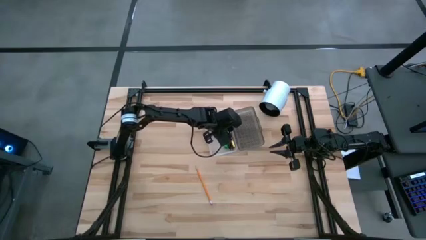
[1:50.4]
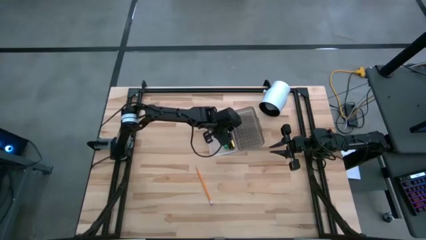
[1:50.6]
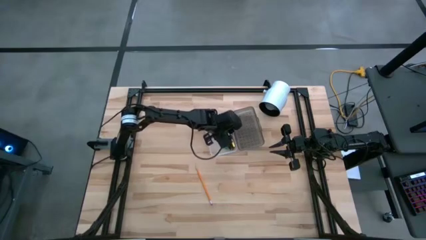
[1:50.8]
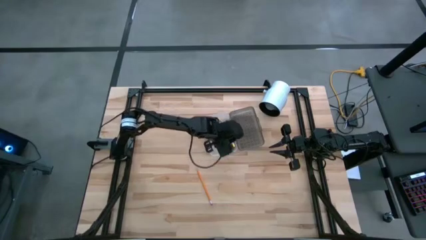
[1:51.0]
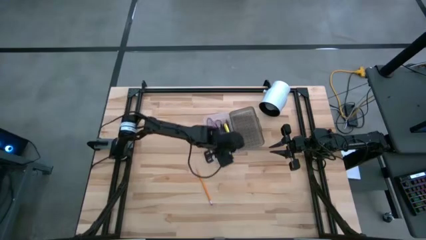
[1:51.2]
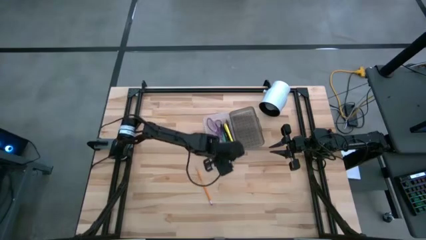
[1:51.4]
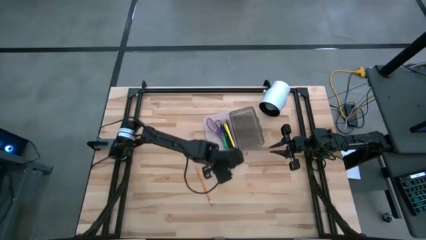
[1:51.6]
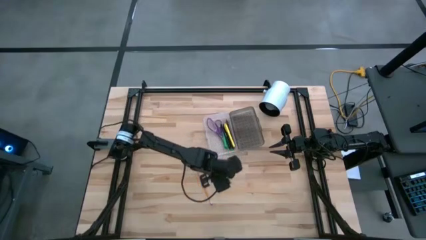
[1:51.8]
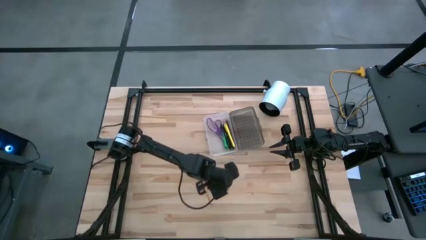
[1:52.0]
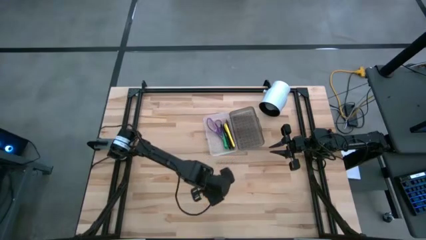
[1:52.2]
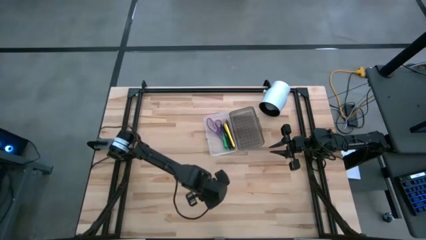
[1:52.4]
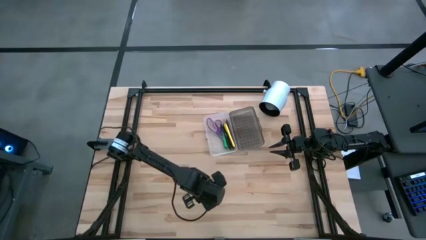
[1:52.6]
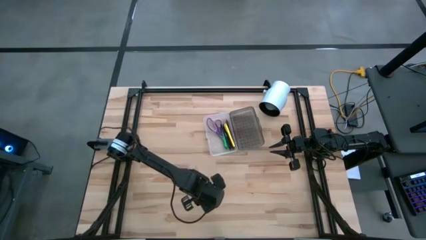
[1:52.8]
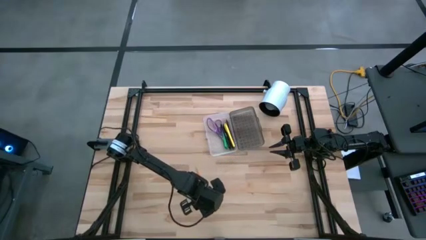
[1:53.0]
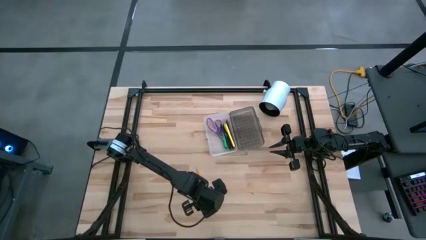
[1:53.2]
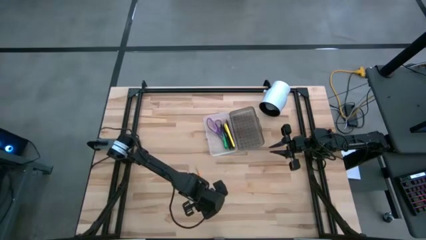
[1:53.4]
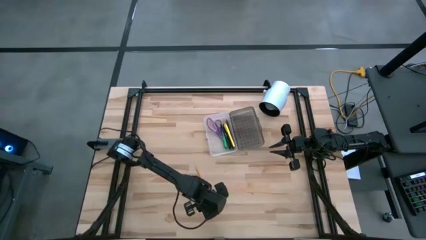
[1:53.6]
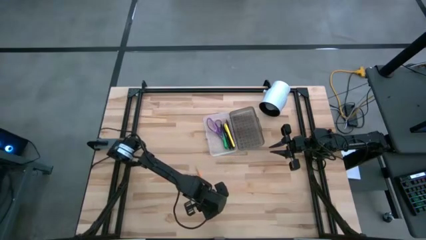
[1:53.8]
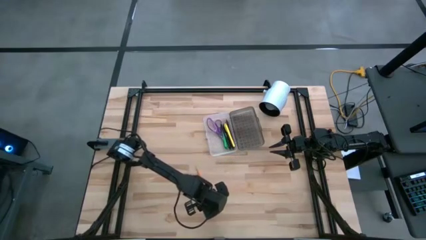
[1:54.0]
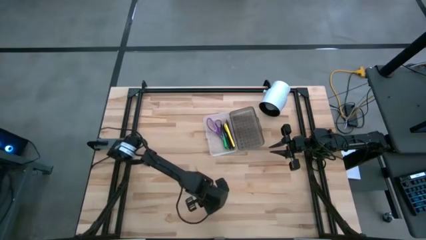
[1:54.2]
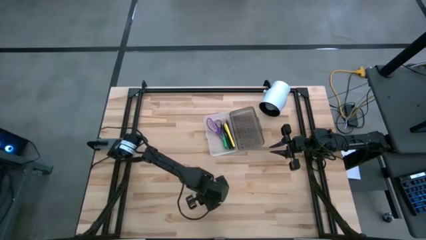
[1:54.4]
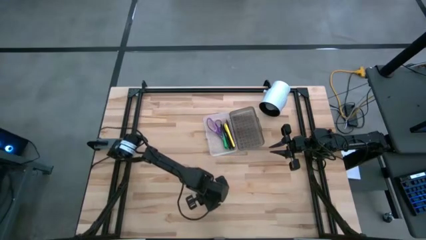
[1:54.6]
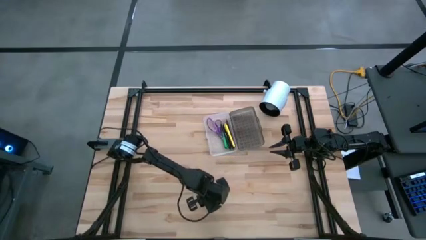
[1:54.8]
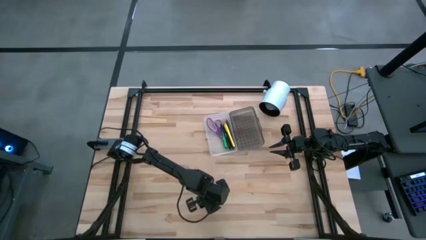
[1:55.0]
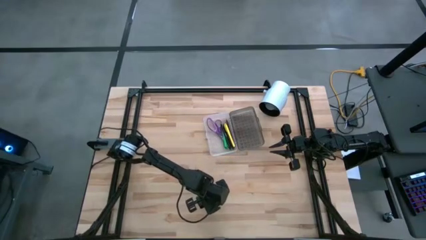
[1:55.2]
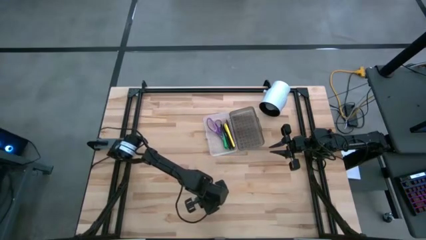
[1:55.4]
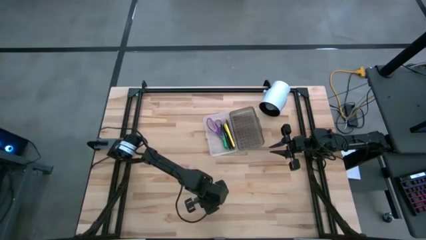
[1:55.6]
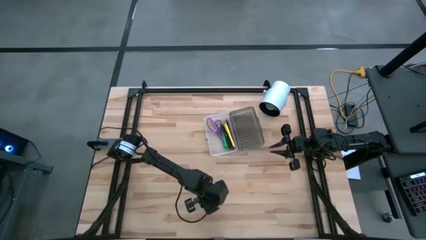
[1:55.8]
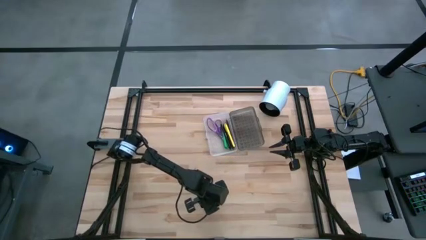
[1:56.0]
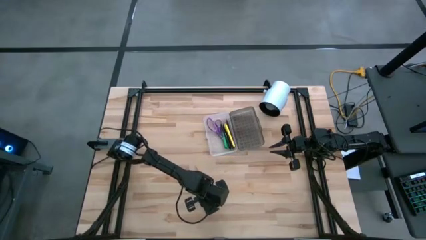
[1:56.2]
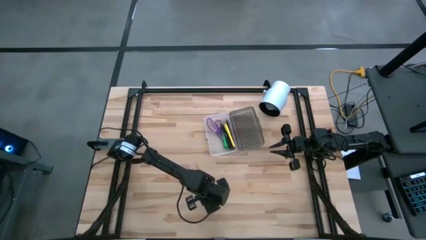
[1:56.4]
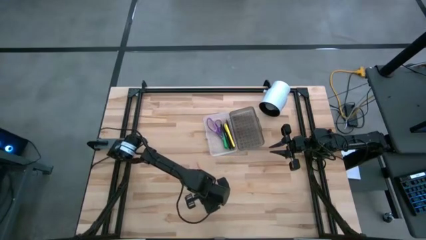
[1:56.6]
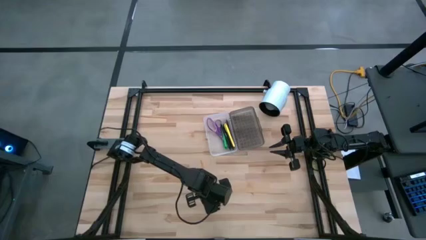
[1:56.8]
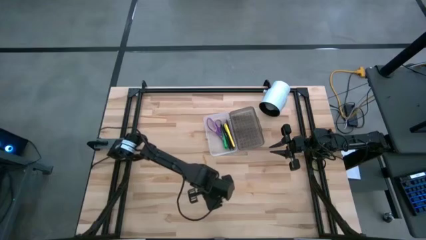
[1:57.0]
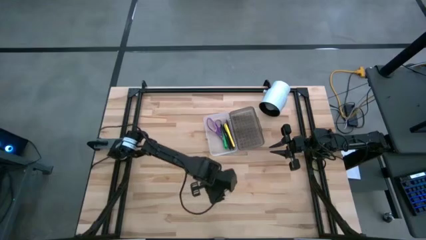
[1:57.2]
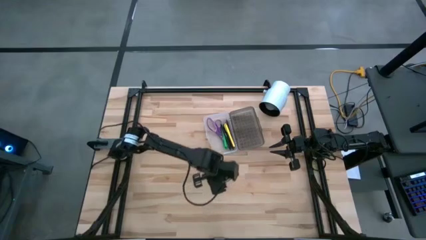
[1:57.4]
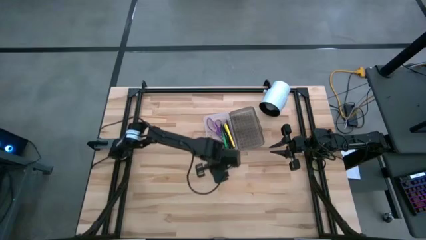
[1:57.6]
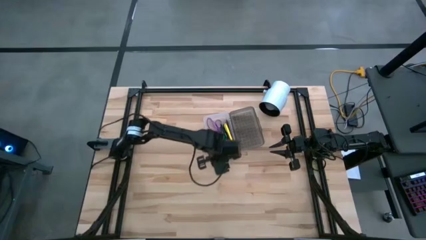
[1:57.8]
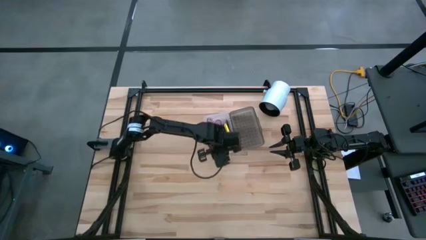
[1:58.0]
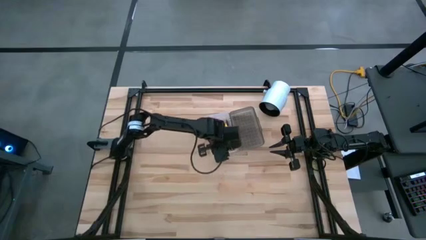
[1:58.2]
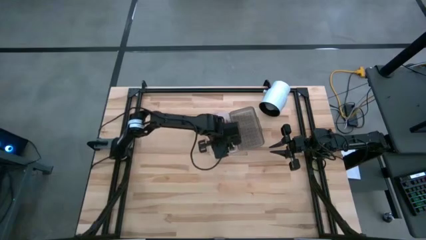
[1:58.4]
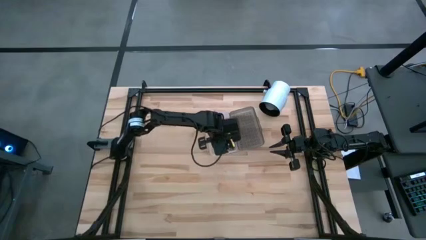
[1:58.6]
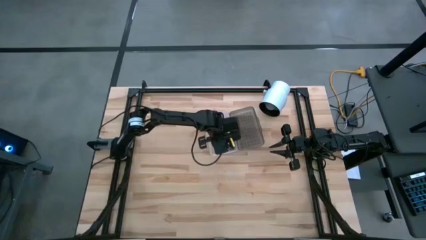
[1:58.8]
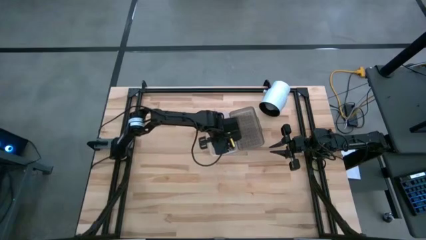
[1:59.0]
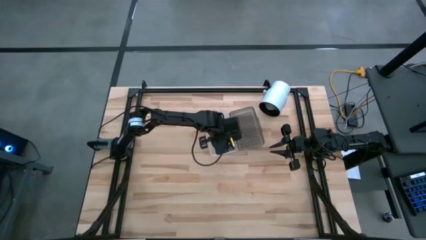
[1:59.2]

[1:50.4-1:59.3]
Task: Pick & place school supplies into a supply box
Put the orange pencil into the supply box

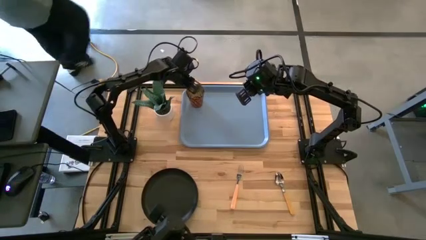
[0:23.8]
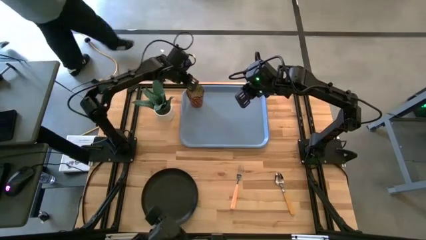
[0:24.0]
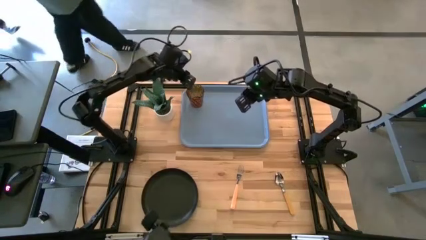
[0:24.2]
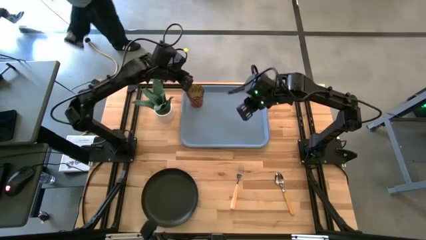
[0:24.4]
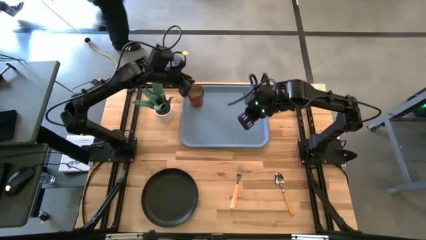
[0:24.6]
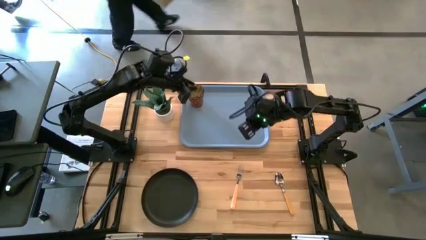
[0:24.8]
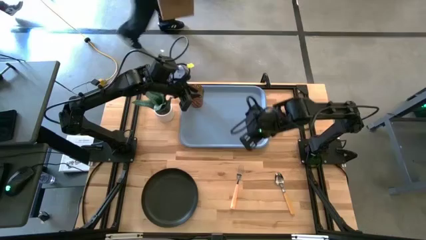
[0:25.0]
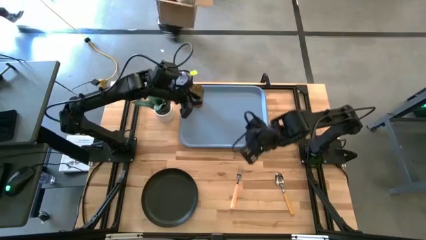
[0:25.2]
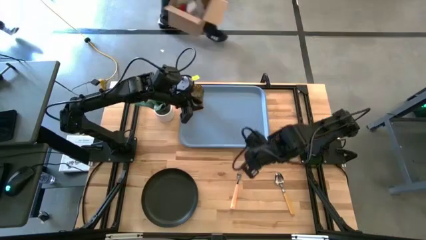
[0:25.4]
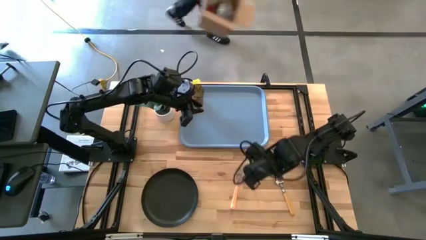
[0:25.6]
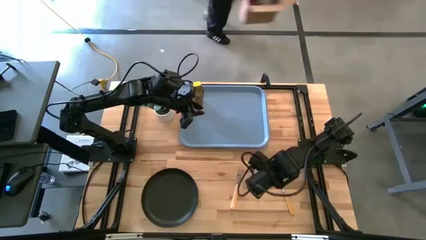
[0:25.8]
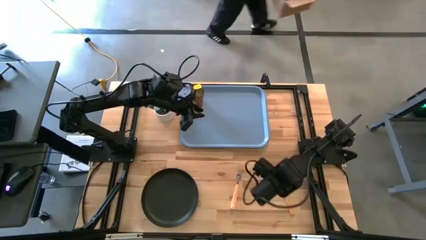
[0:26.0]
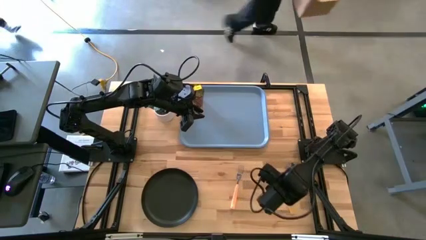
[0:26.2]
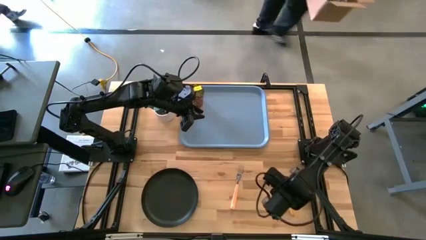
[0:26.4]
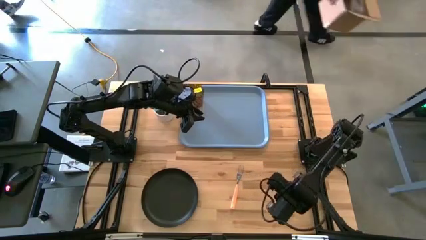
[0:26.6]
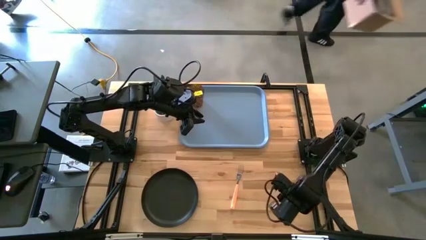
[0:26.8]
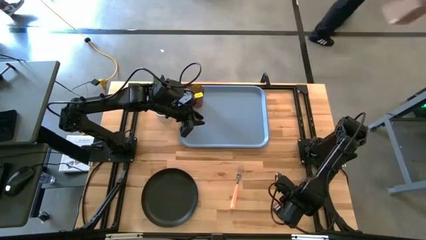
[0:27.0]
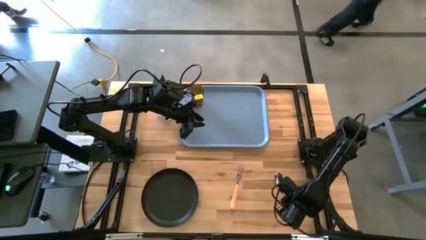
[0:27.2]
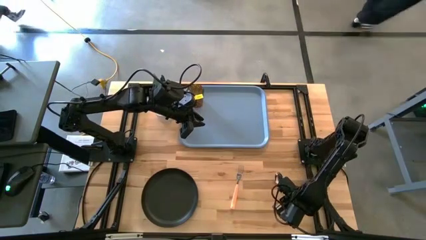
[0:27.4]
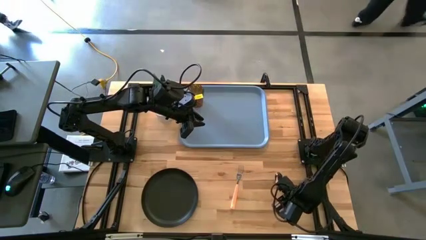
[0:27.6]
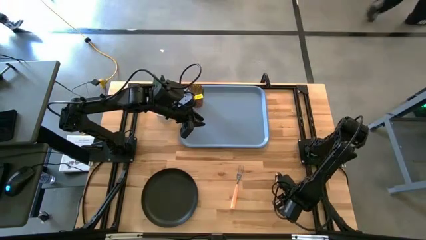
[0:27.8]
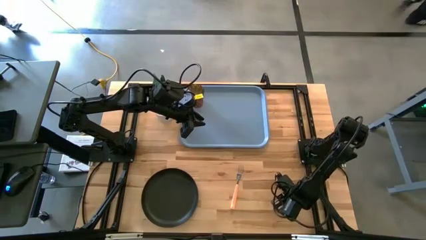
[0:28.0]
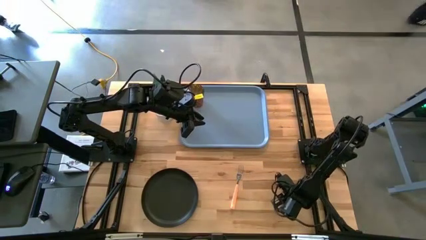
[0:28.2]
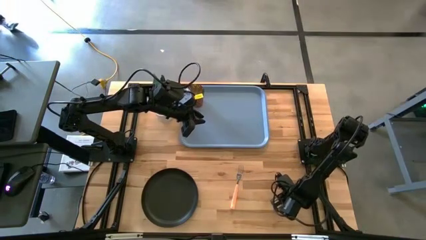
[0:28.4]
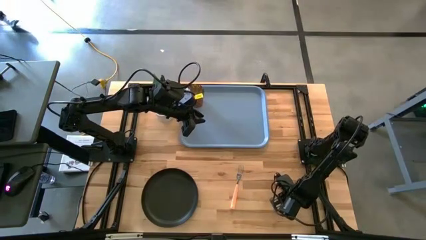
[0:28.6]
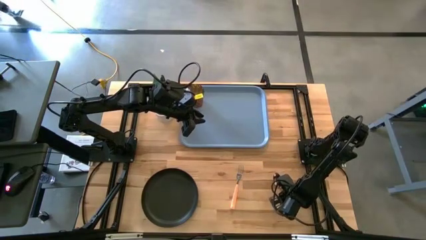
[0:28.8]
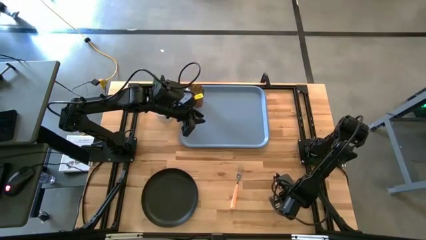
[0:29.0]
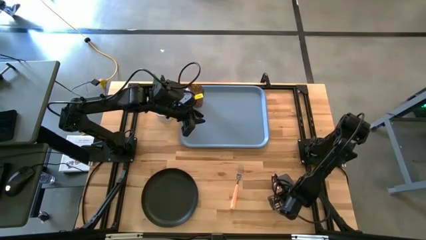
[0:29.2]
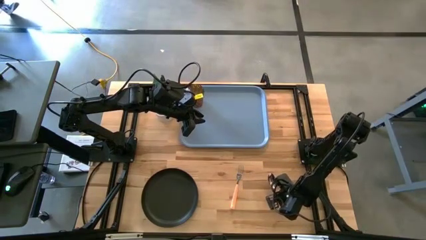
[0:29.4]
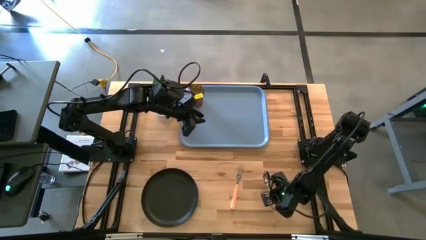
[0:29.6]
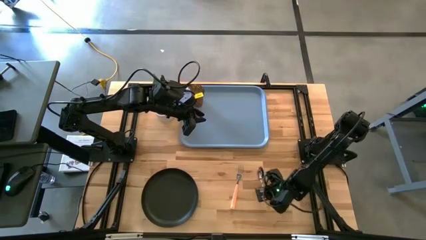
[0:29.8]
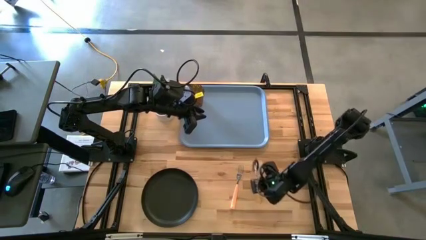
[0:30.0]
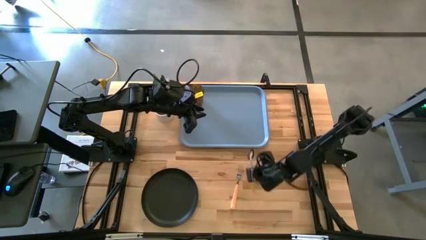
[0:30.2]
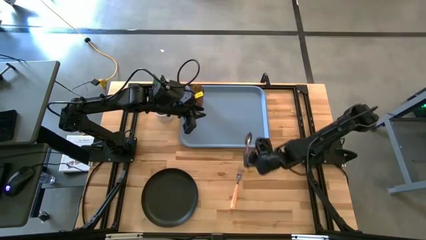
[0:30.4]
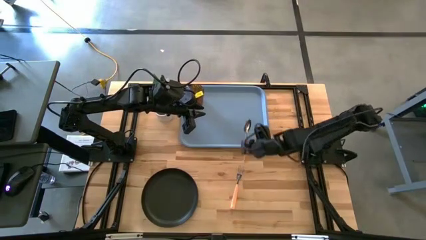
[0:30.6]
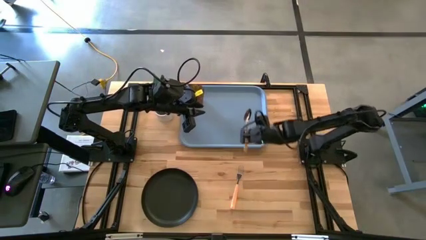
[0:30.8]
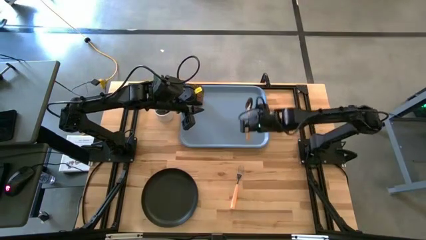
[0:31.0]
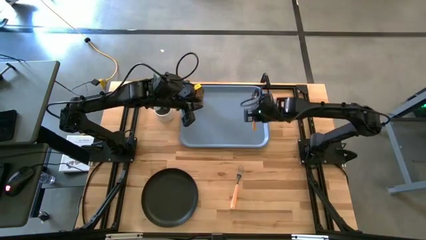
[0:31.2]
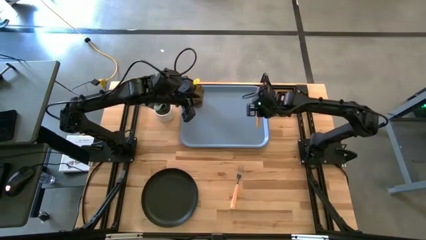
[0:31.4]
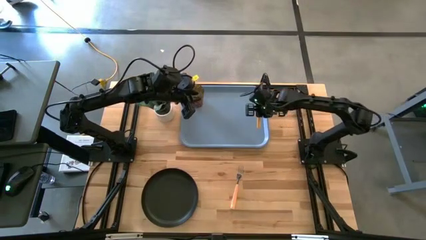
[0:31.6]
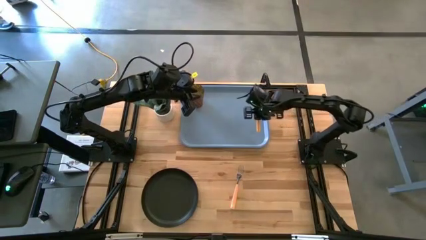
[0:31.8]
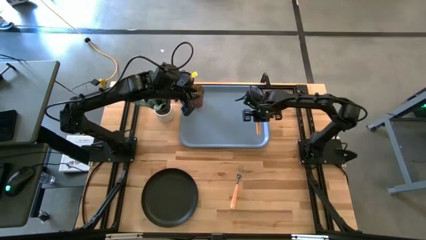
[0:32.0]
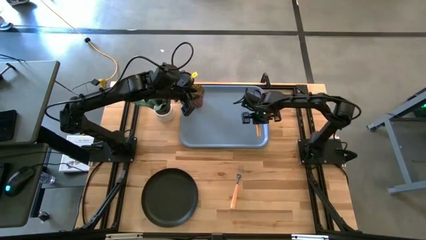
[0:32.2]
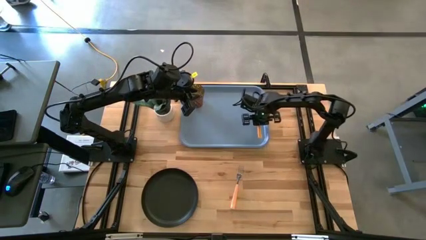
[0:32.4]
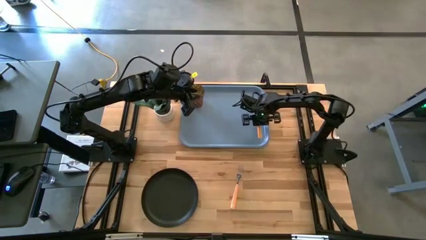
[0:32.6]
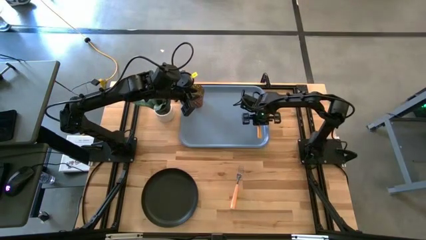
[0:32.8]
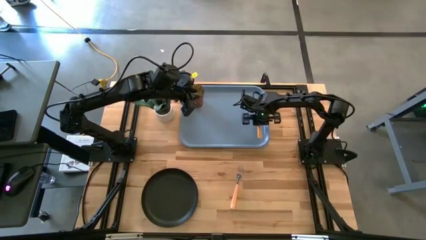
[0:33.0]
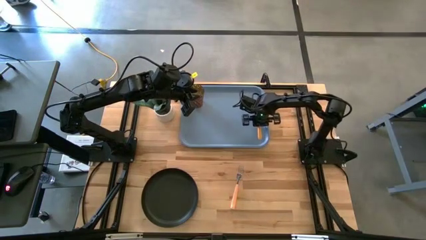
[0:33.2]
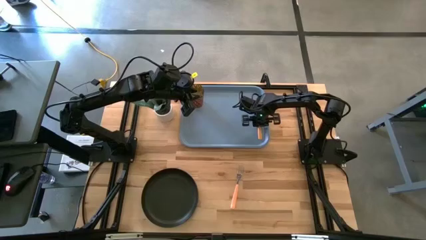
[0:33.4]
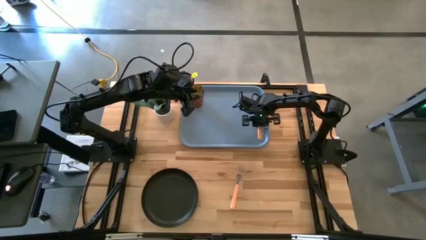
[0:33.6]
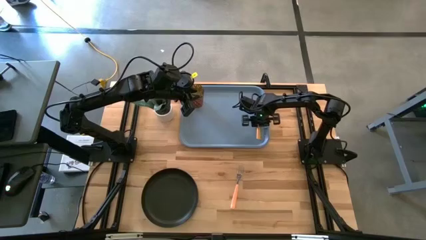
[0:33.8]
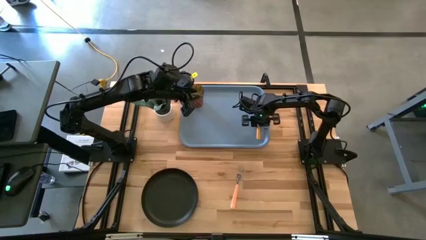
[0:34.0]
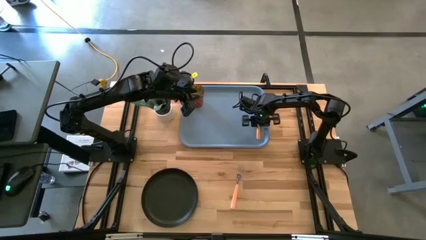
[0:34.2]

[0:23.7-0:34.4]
Task: Pick and place plate/cup/fork/spoon on tray
Put the yellow spoon to the right of the blue tray
